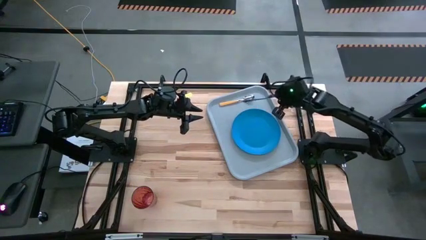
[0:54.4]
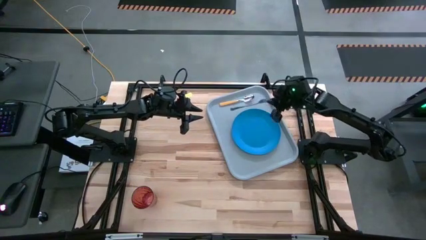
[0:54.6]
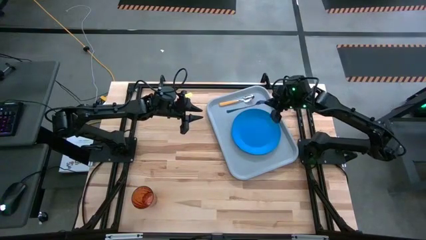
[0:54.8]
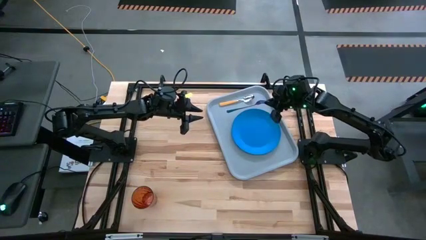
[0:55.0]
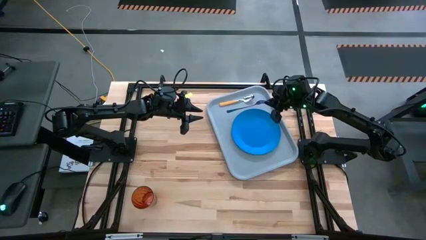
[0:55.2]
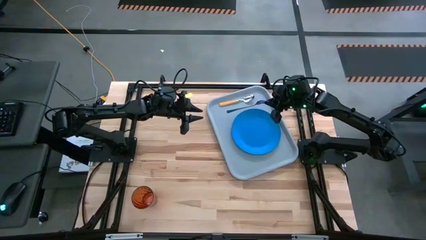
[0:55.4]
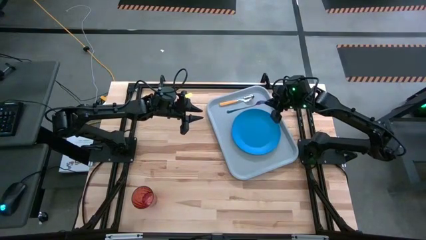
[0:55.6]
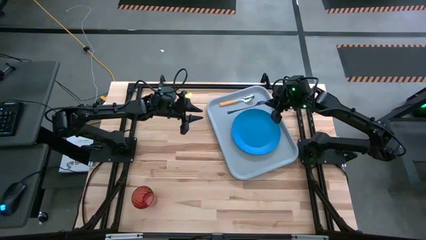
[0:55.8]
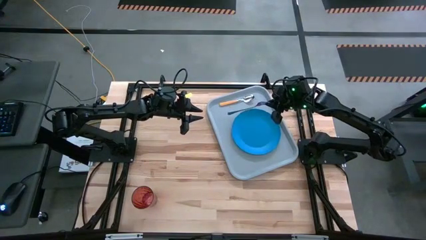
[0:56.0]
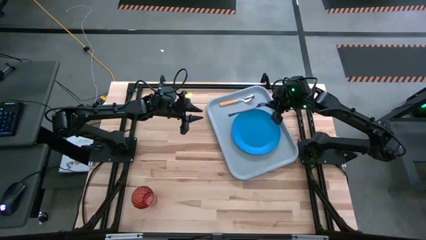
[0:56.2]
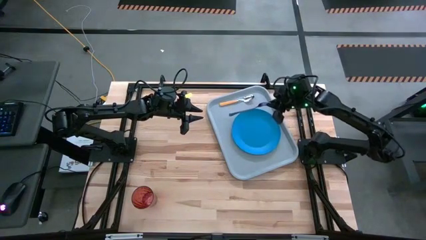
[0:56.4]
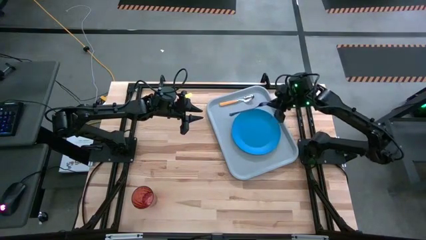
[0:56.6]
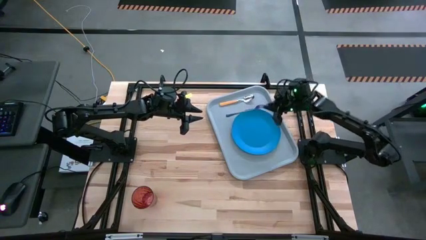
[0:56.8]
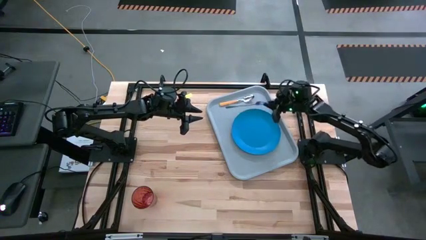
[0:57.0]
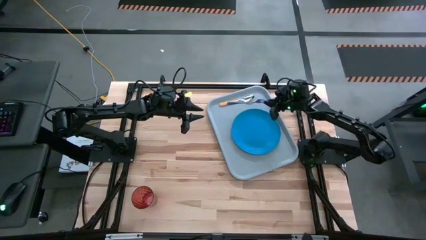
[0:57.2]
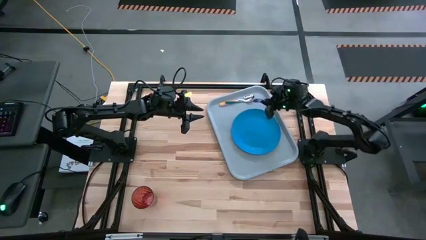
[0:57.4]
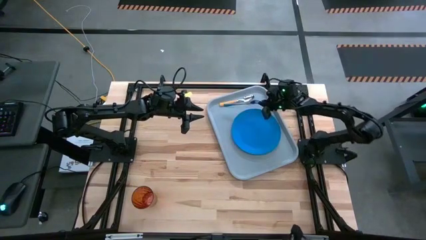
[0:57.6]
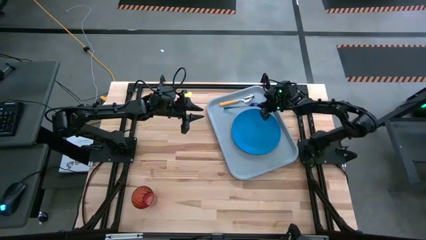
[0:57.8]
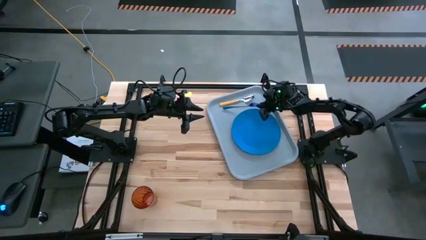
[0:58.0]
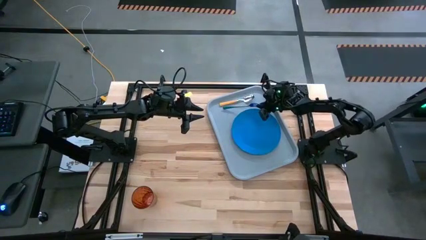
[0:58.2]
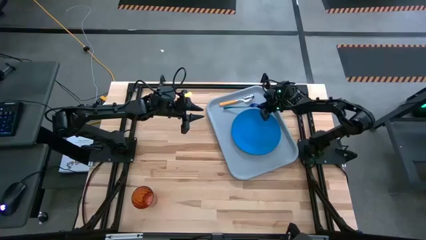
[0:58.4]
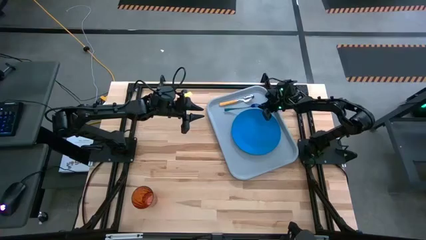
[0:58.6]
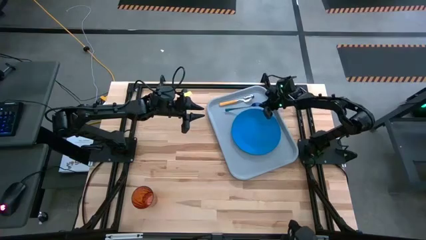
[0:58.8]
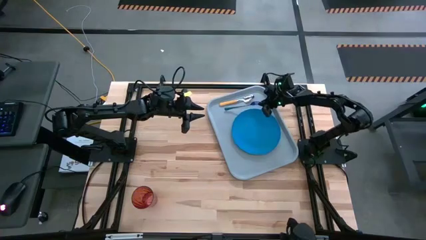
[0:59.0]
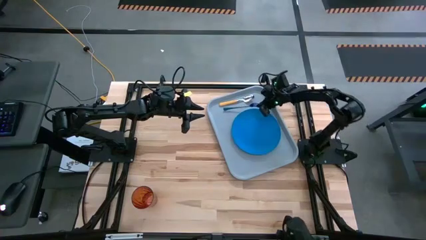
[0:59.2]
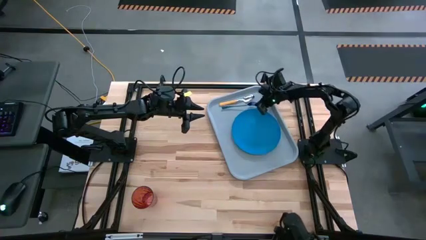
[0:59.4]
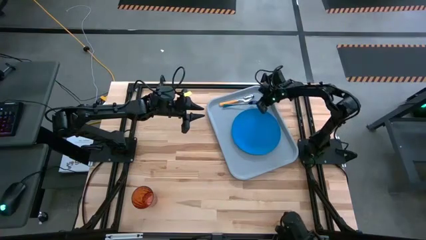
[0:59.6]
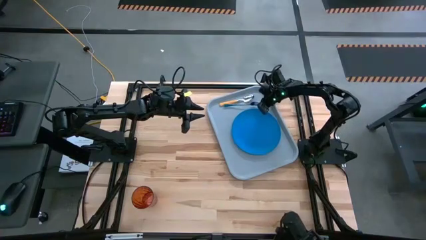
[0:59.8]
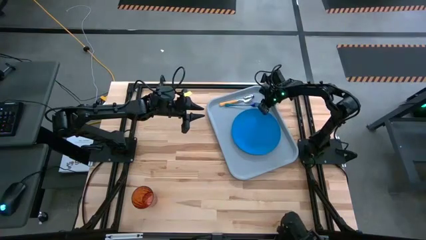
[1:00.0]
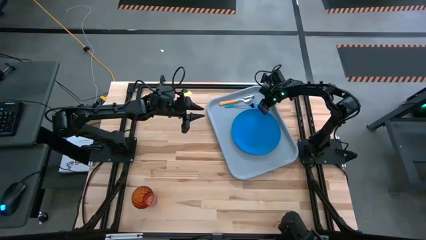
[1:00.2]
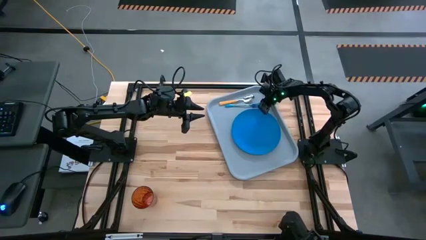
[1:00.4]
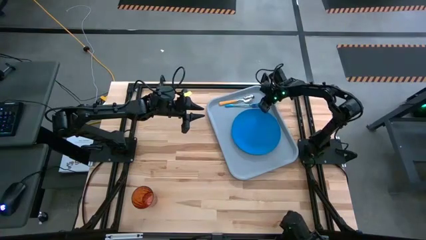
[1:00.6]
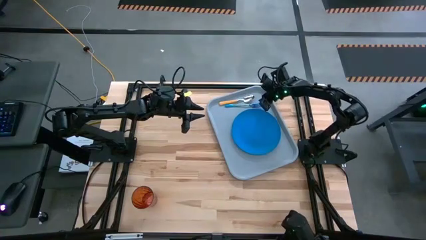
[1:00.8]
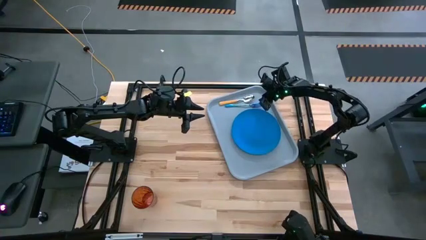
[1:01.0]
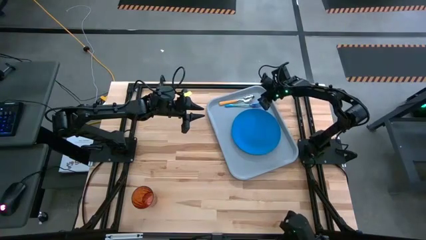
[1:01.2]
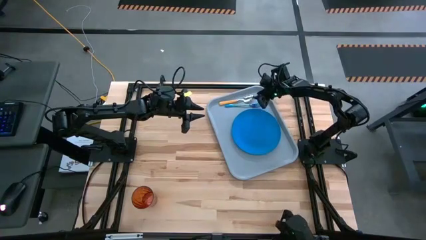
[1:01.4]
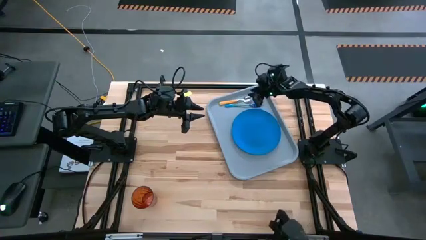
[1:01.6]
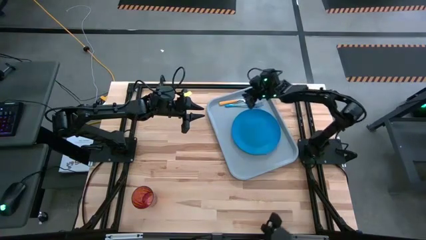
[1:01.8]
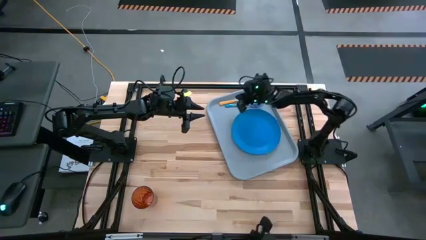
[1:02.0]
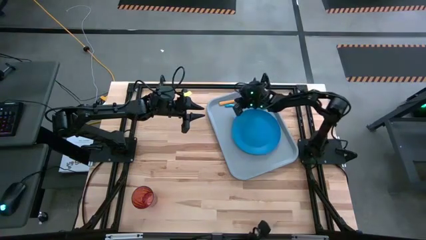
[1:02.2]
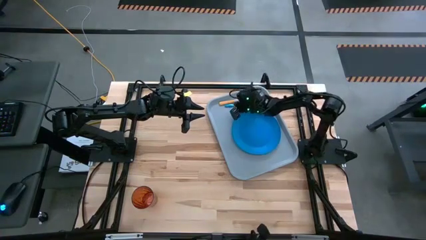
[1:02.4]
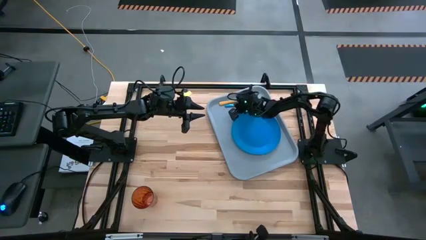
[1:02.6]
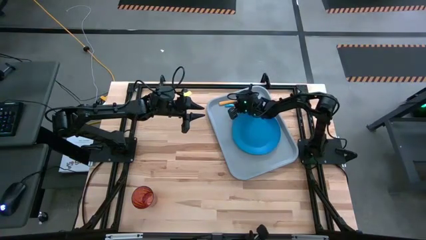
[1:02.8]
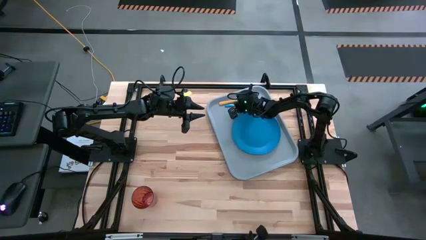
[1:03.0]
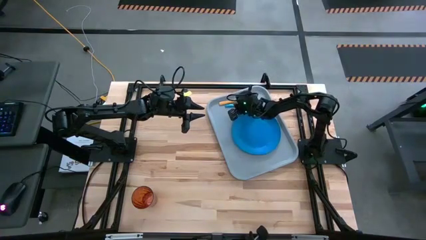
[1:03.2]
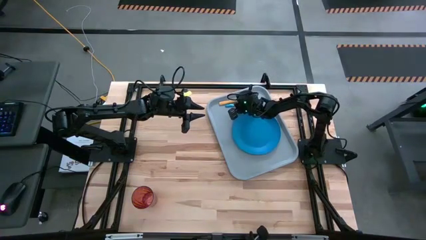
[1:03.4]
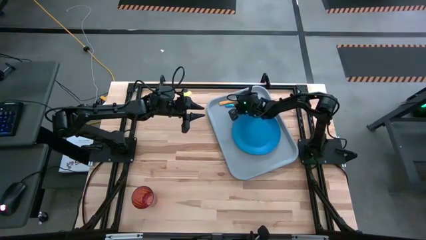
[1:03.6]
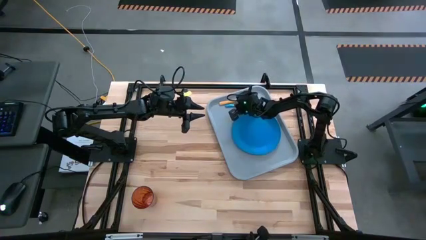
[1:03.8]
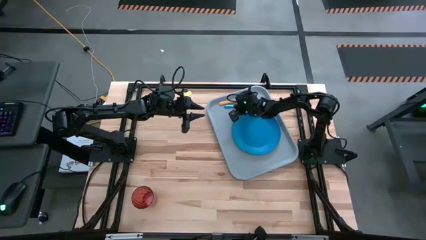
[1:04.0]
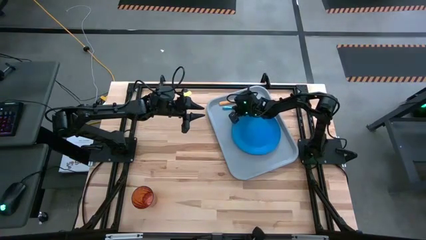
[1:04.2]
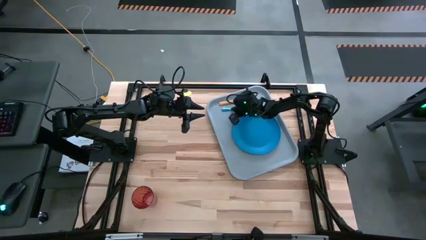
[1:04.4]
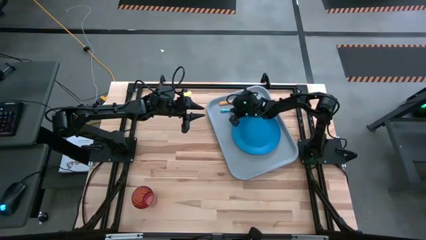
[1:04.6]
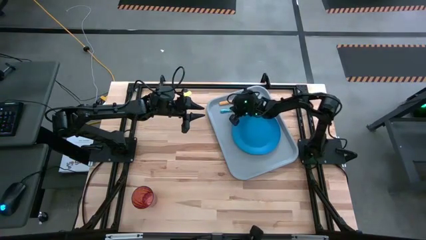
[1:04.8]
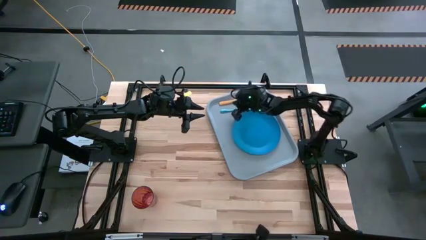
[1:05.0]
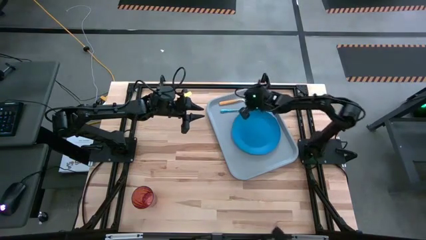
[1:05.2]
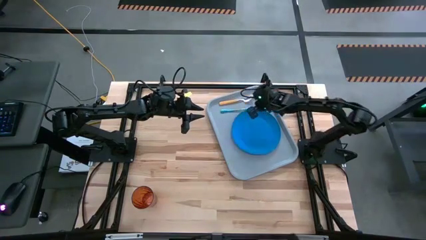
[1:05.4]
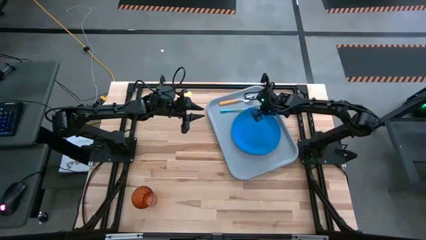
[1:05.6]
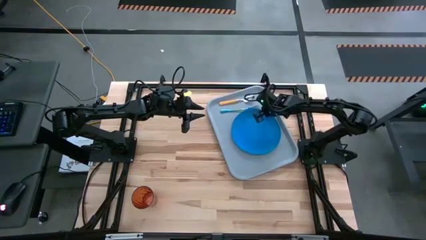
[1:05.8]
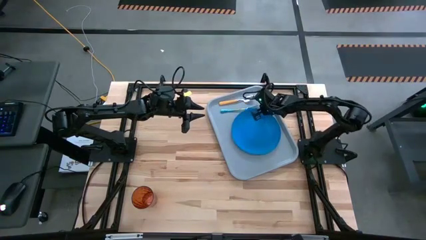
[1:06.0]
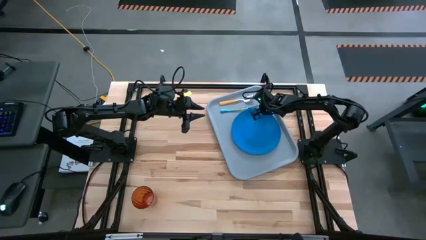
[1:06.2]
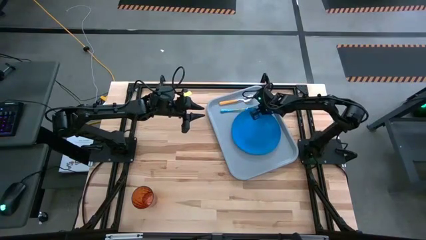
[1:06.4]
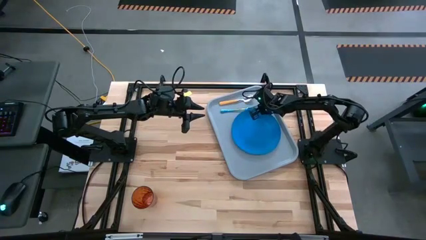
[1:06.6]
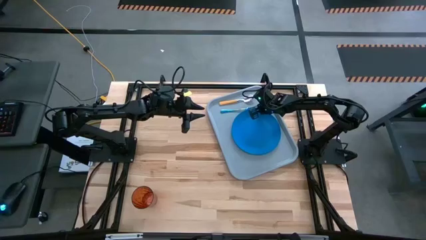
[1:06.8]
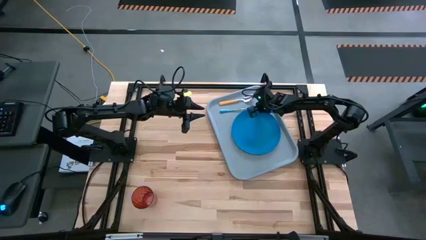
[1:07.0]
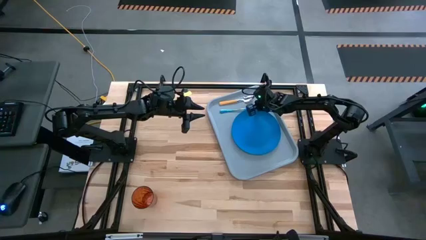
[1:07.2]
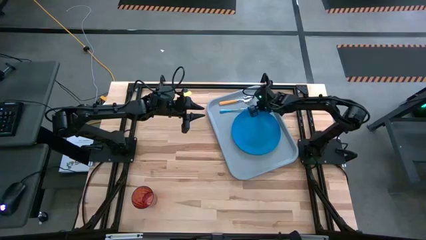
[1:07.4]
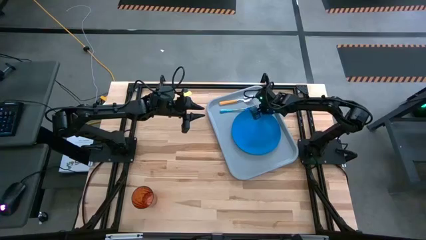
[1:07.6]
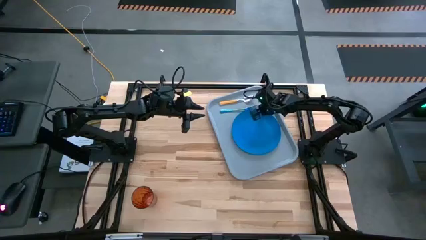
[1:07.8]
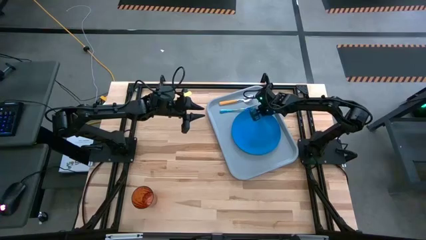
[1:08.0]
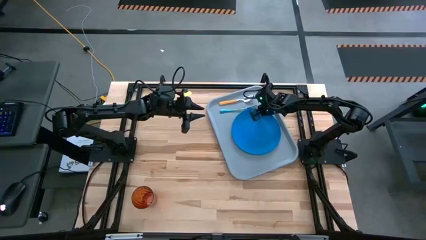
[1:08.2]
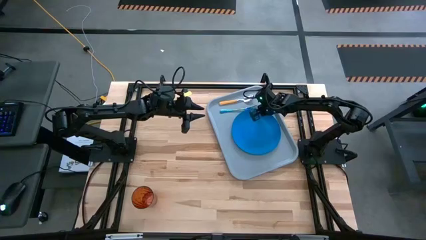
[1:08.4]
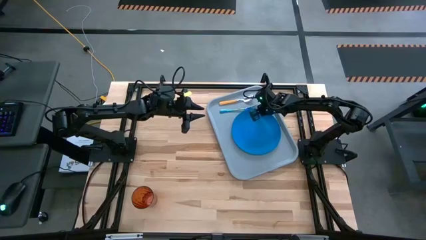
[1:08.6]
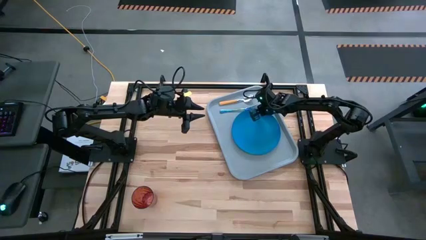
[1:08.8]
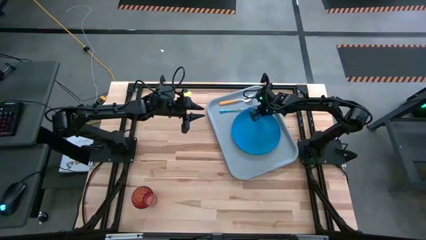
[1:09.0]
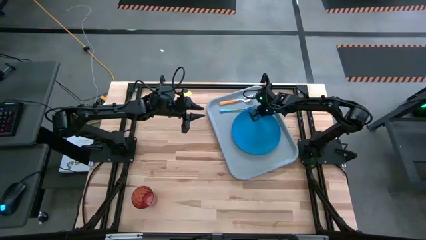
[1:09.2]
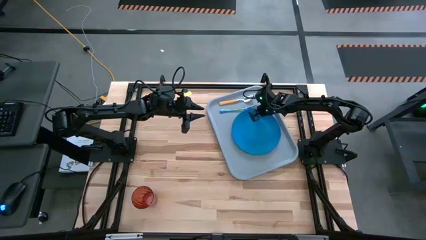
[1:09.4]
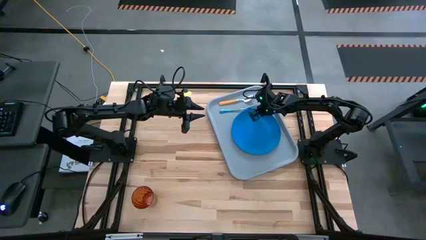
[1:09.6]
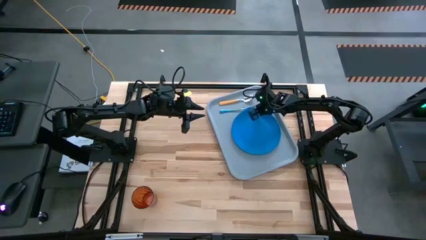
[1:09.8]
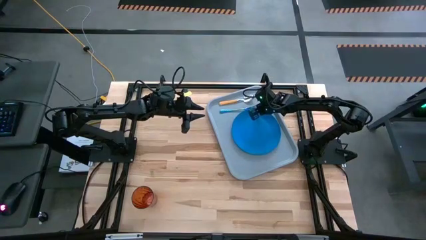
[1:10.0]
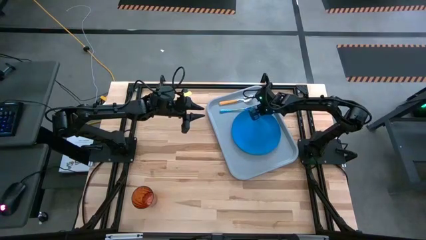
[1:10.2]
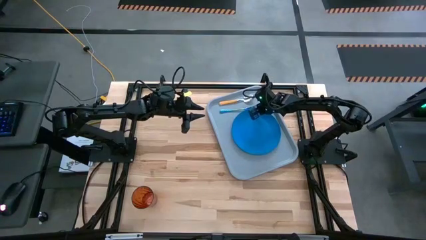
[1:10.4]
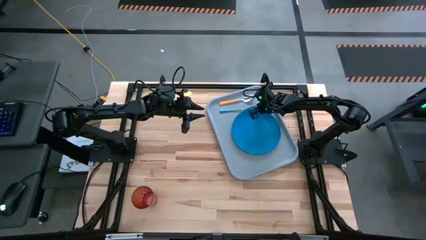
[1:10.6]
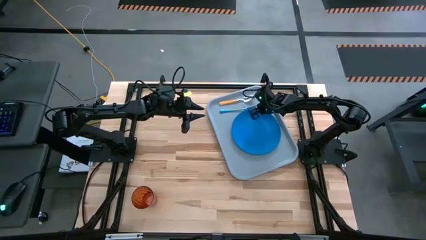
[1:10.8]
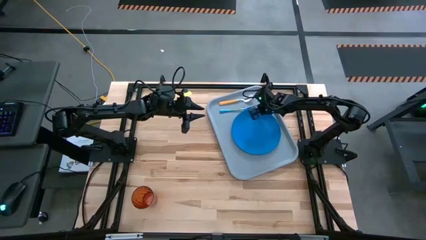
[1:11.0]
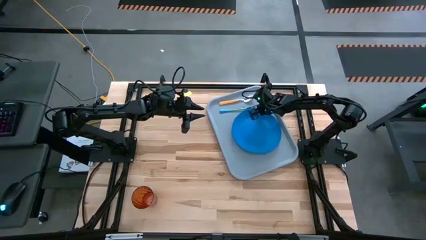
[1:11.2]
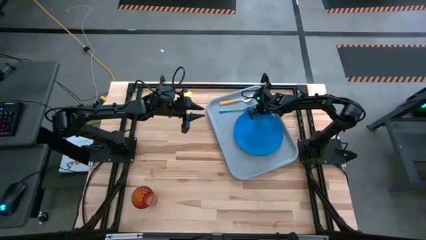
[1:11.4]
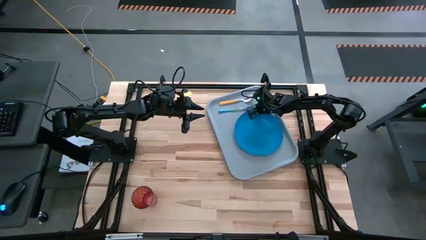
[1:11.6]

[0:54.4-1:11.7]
Task: Pick and place plate/cup/fork/spoon on tray
Put the blue fork on the gray serving tray to the right of the yellow spoon
